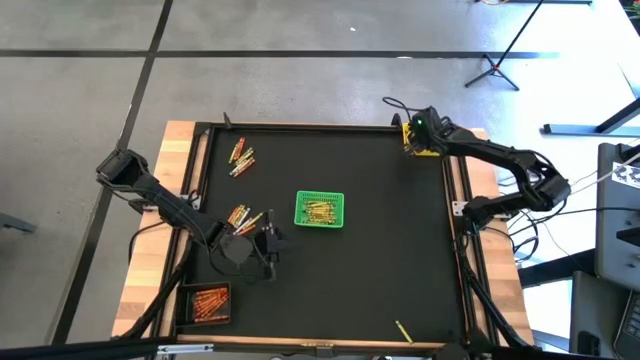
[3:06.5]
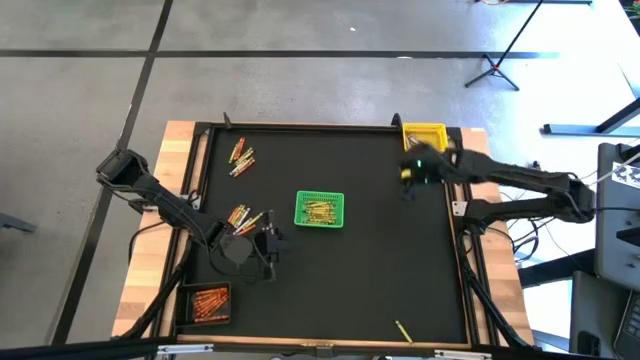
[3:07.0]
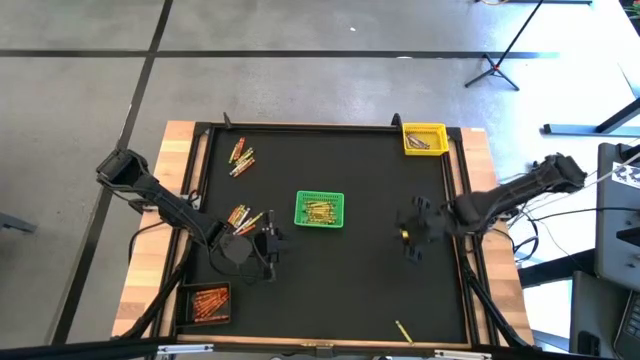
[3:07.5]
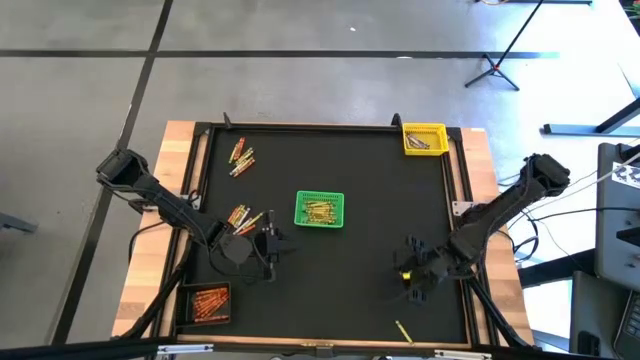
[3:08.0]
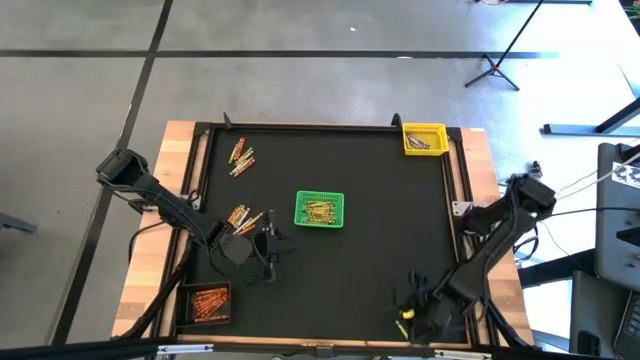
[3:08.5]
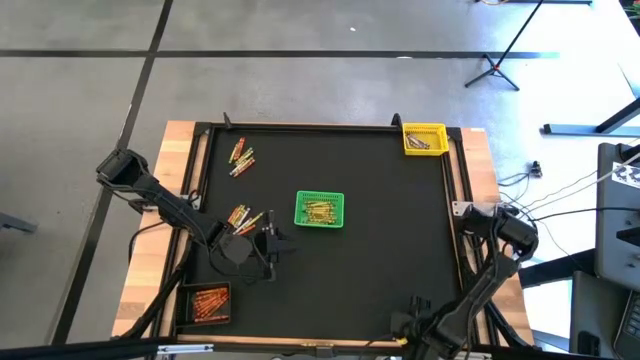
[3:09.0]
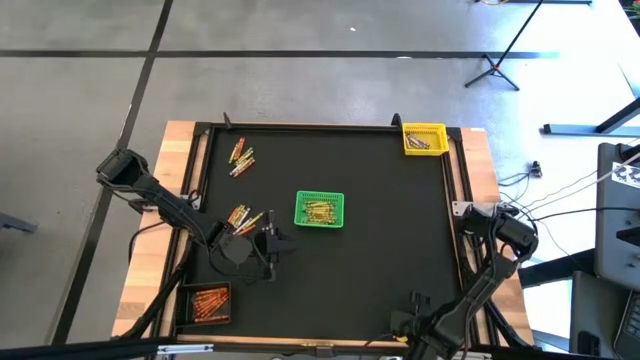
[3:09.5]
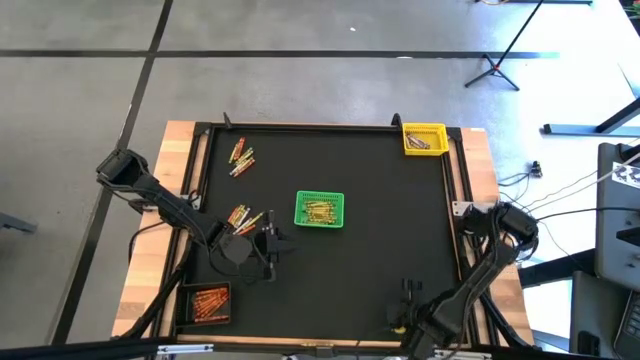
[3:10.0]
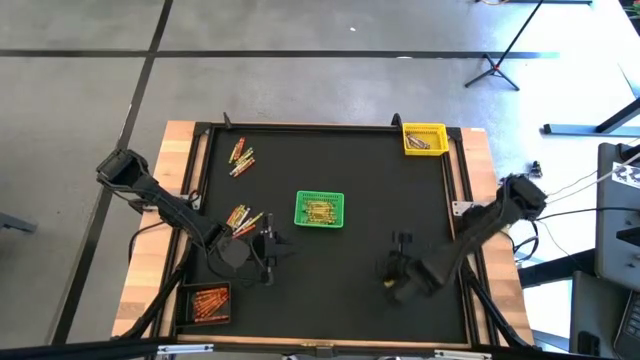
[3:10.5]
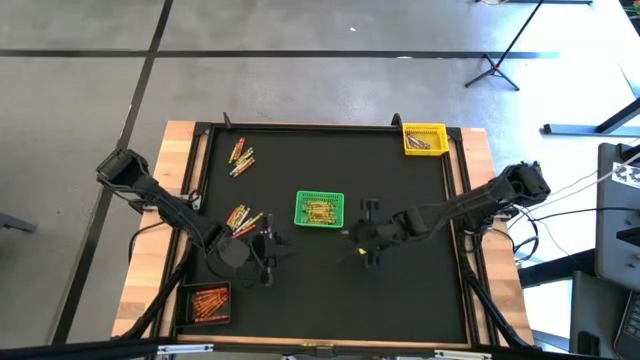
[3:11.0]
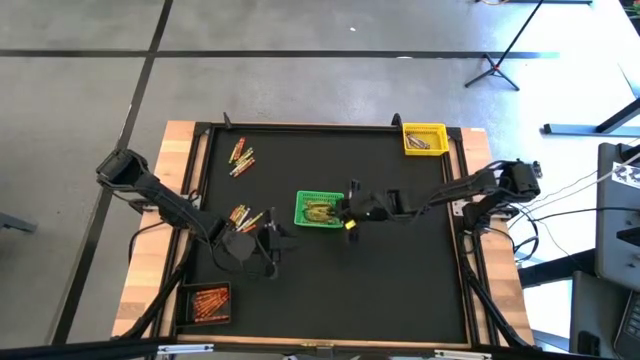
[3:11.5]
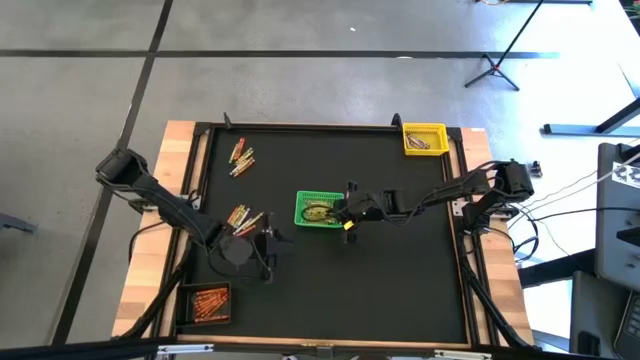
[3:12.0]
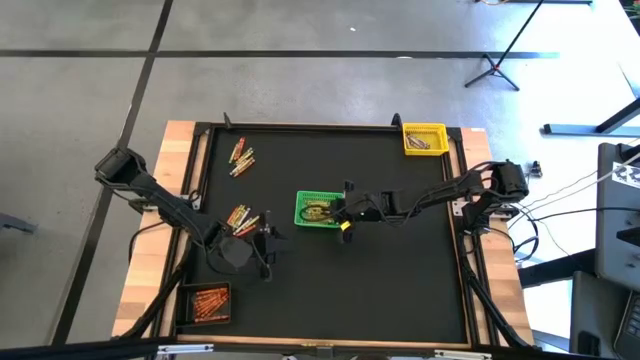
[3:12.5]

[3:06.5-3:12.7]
Task: Sort crayons
Put the green crayon into the green bin

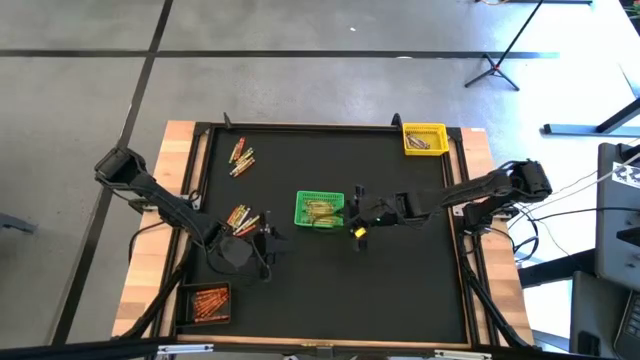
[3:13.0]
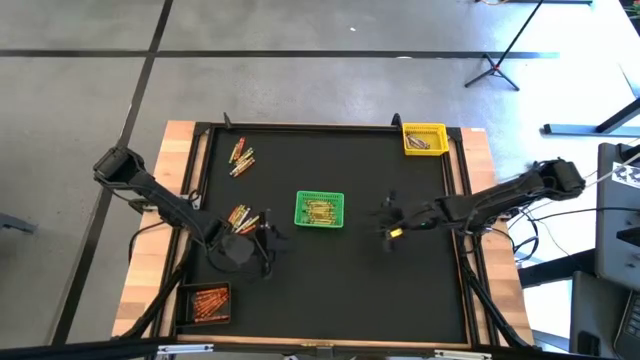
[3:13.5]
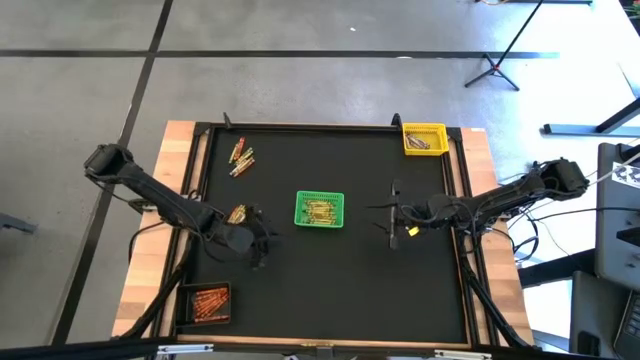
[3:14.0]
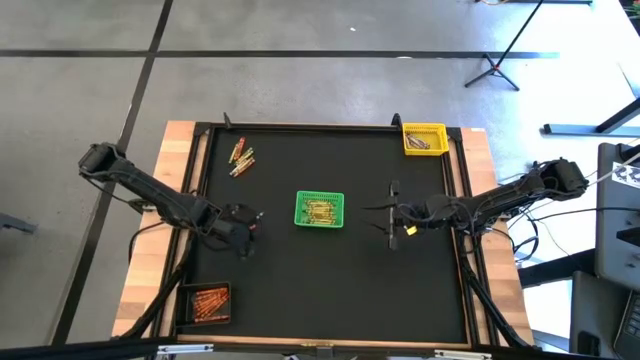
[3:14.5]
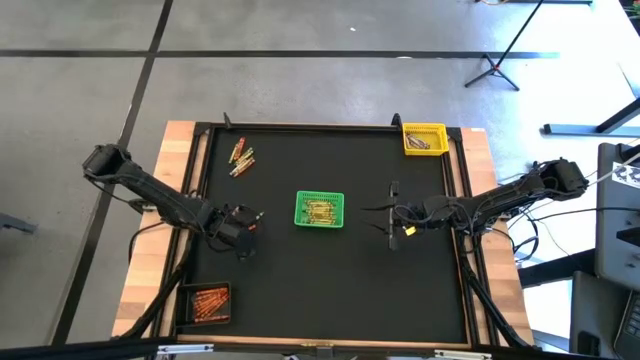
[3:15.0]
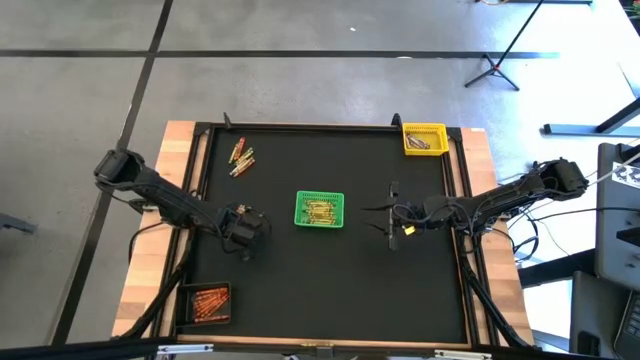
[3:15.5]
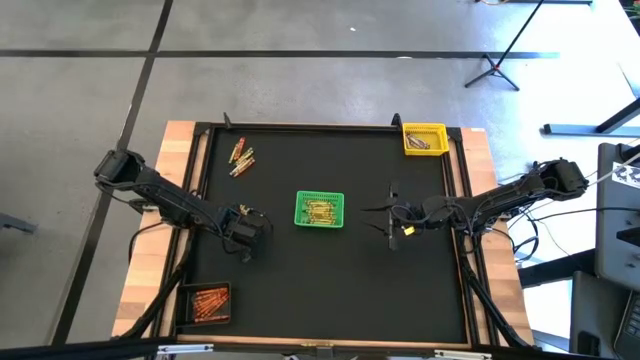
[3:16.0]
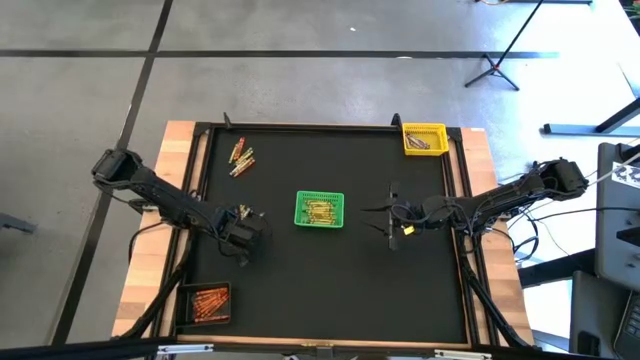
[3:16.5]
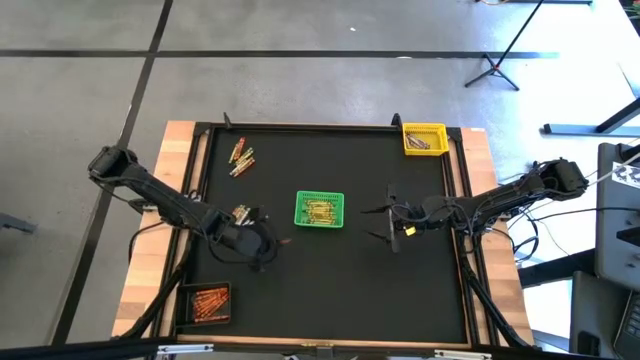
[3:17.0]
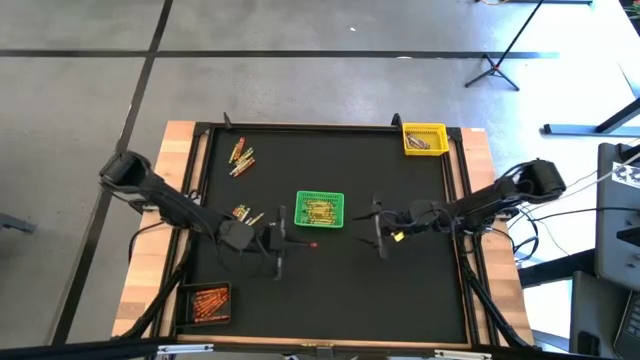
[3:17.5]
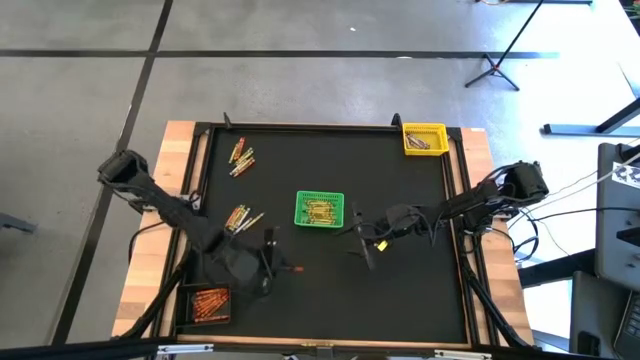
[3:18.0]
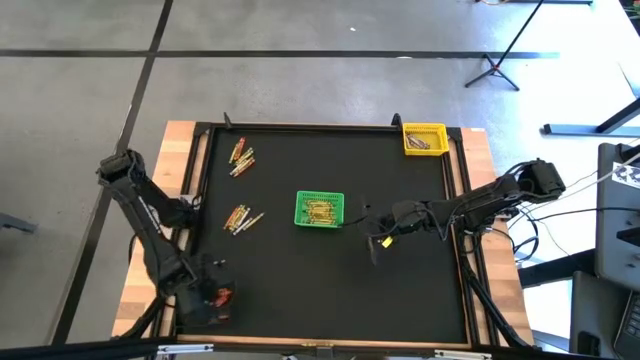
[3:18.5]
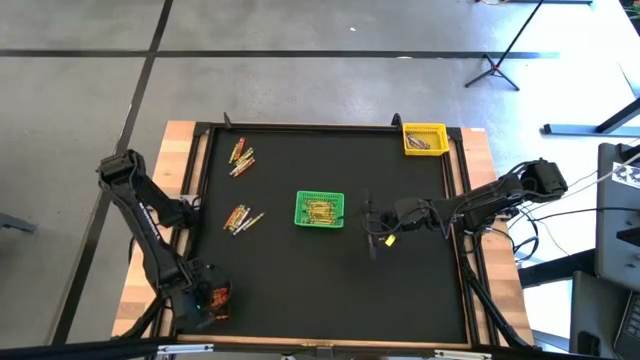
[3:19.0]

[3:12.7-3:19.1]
Put the orange crayon into the black bin

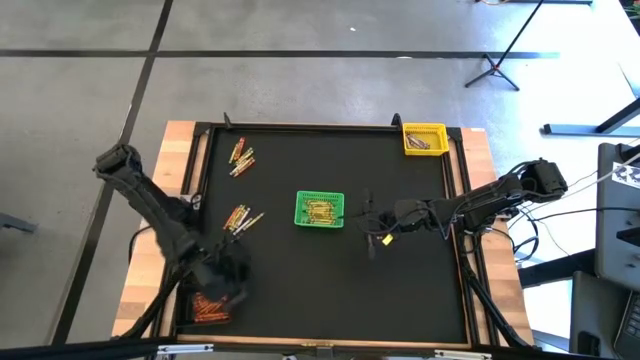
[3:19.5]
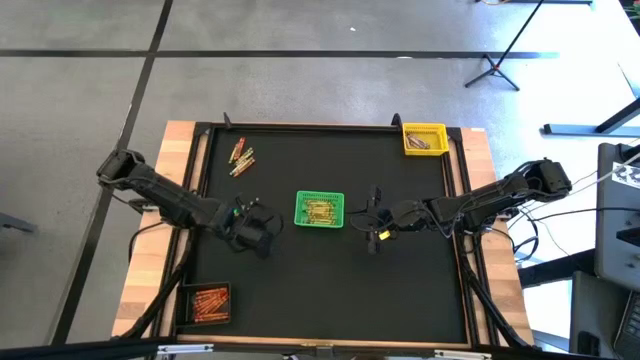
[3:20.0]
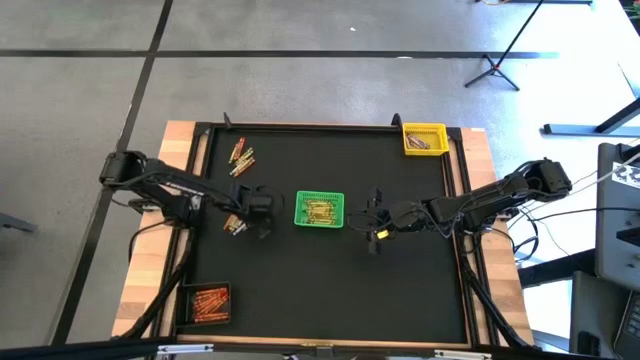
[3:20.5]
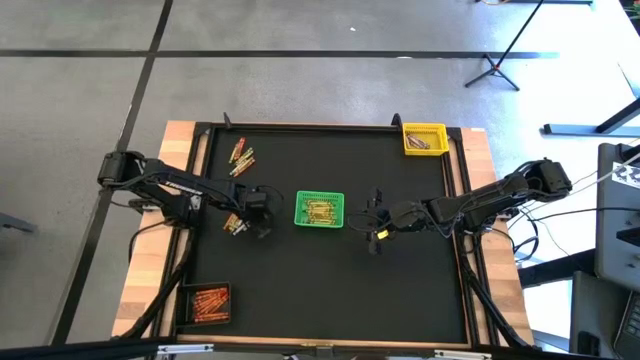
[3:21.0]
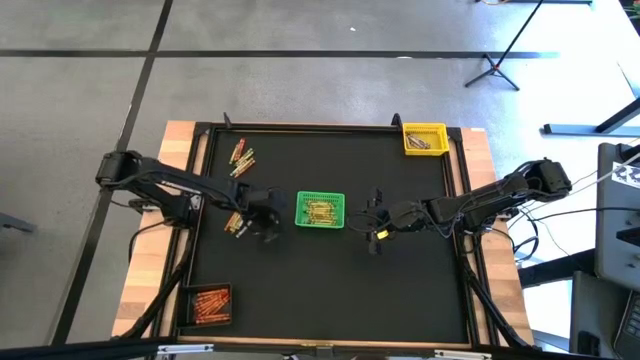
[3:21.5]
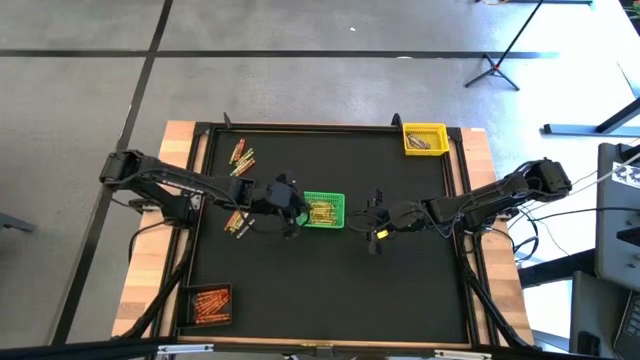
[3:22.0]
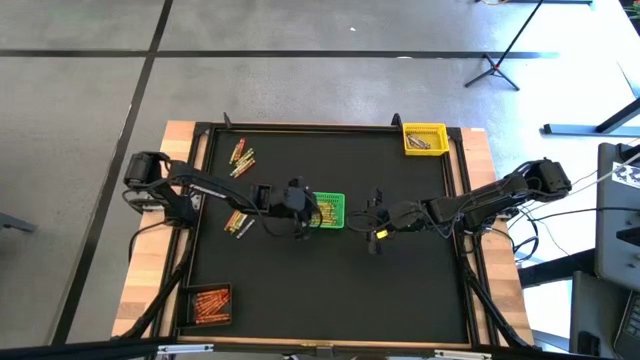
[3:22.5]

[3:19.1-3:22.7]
Put the green crayon into the green bin

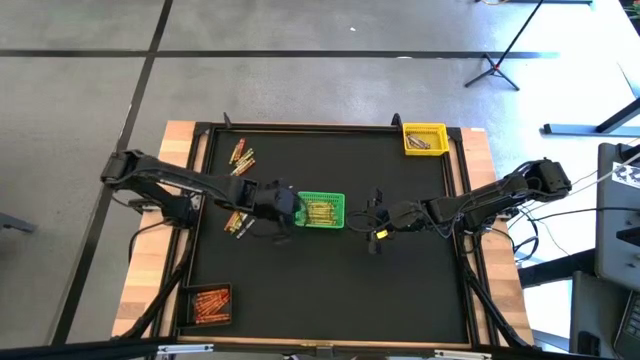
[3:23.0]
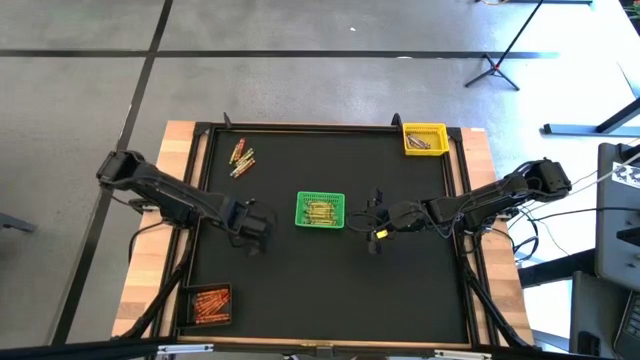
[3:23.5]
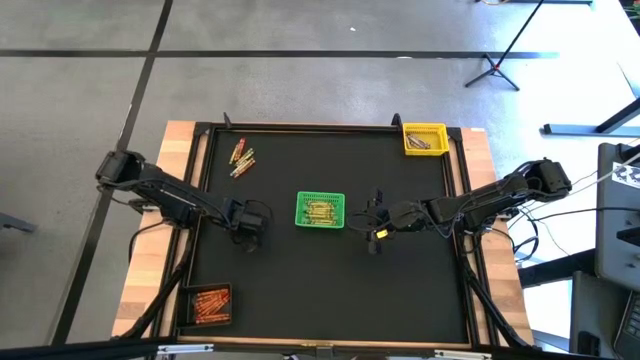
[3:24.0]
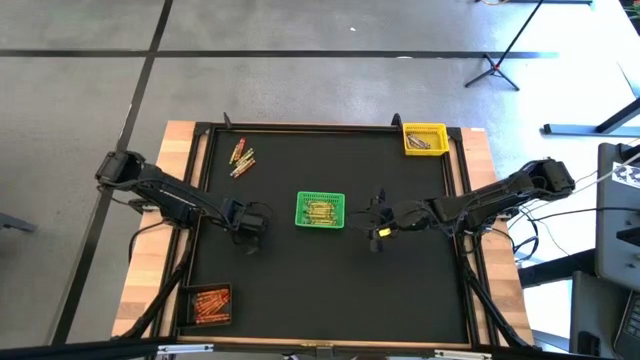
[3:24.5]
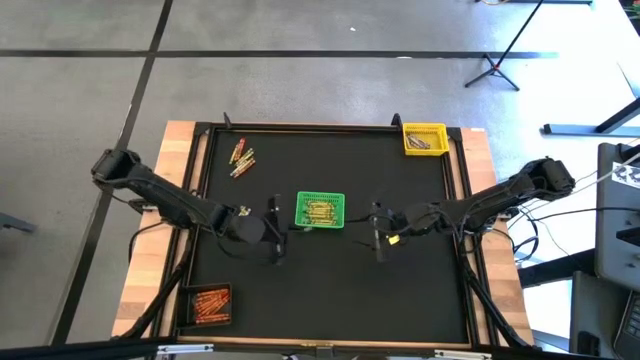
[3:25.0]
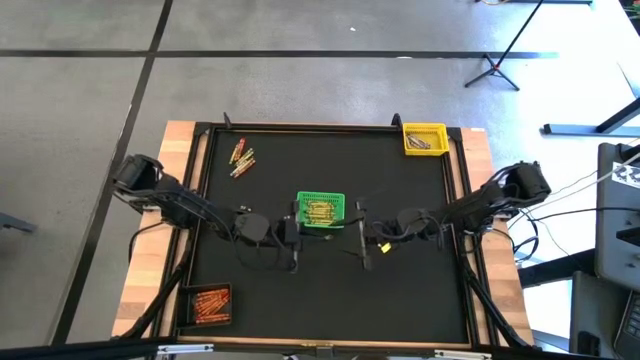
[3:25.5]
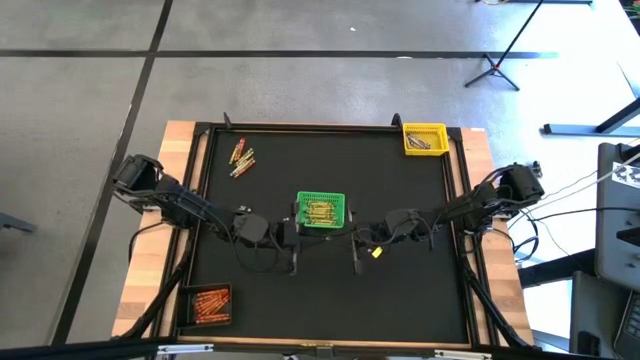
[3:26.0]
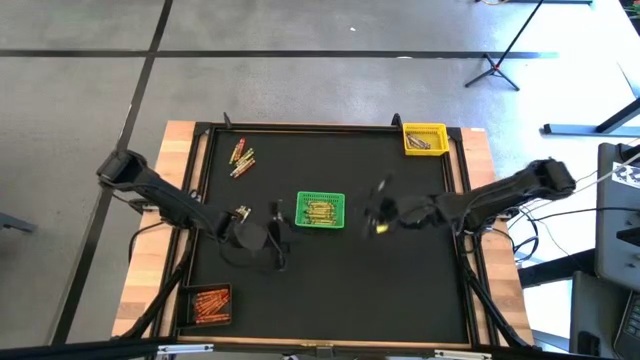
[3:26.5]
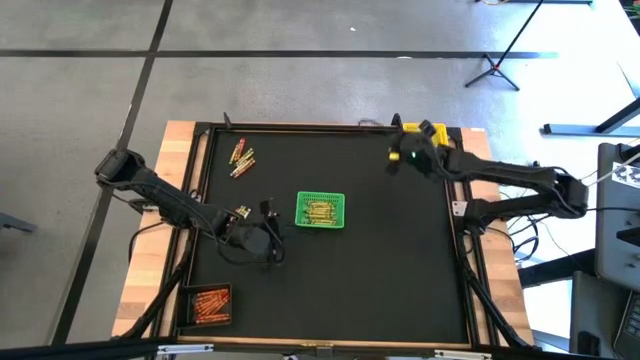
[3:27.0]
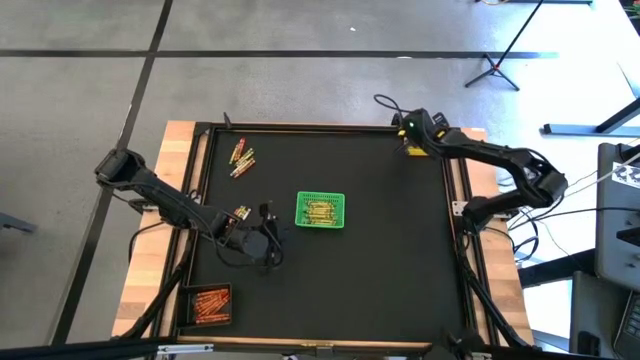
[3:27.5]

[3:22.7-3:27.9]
Put the black crayon into the yellow bin
